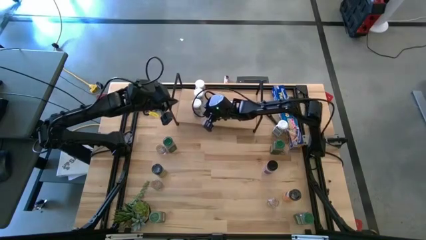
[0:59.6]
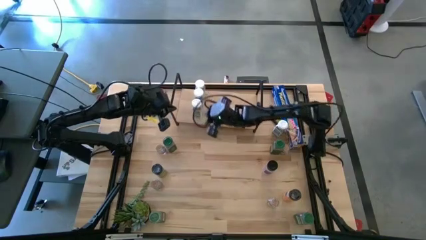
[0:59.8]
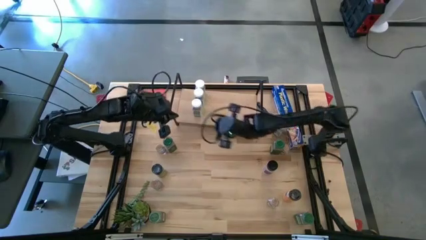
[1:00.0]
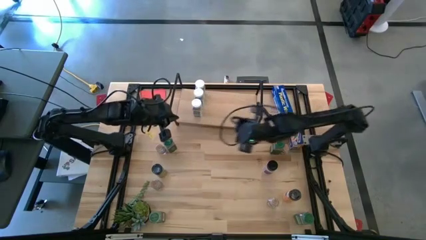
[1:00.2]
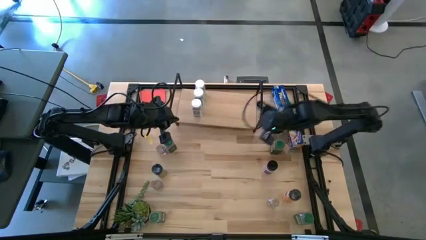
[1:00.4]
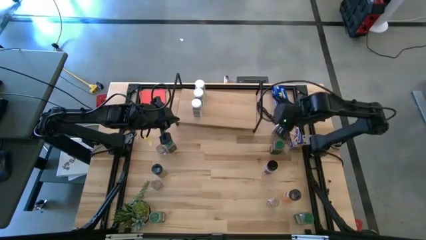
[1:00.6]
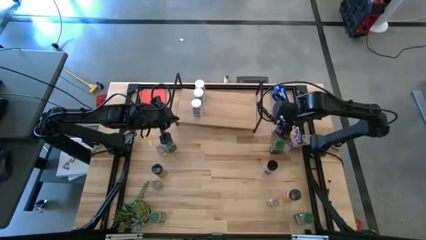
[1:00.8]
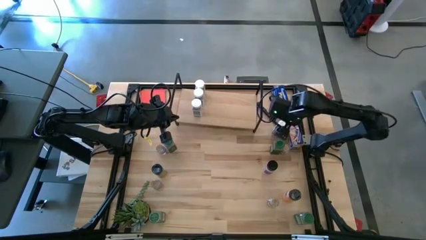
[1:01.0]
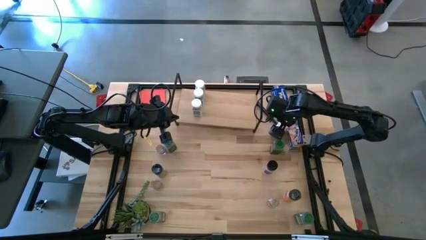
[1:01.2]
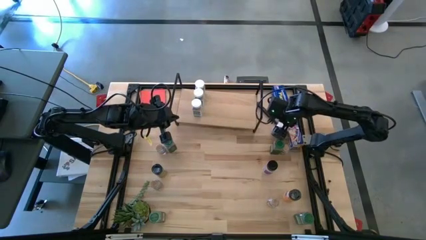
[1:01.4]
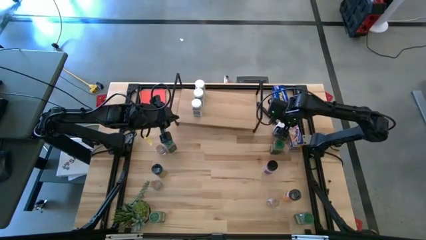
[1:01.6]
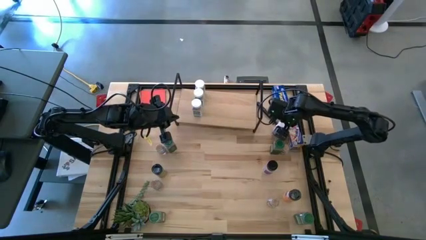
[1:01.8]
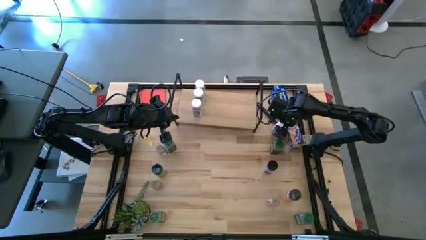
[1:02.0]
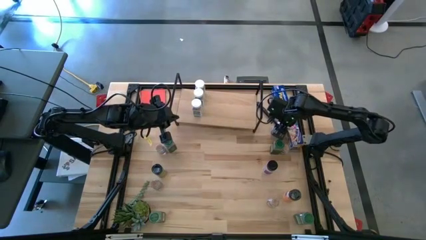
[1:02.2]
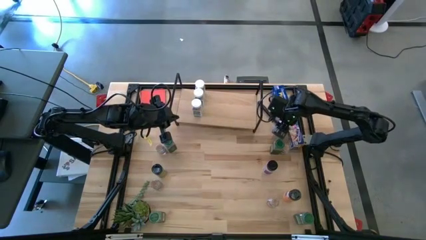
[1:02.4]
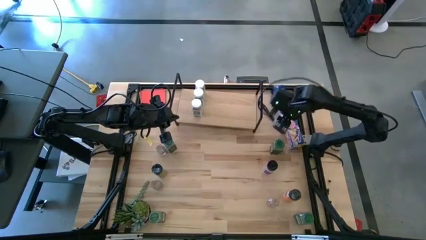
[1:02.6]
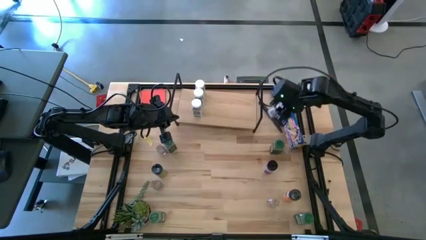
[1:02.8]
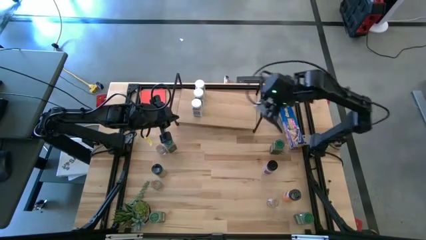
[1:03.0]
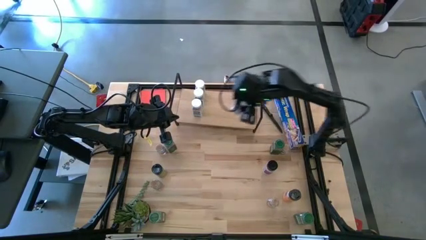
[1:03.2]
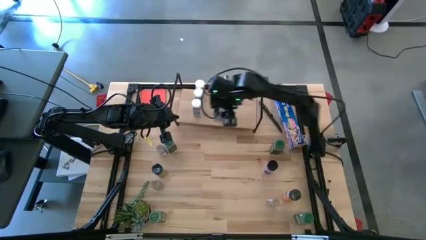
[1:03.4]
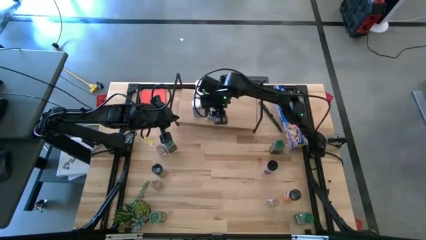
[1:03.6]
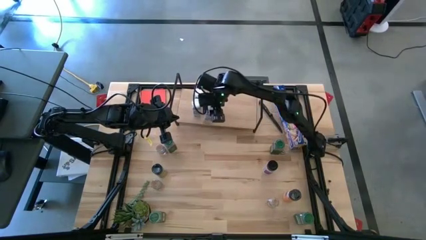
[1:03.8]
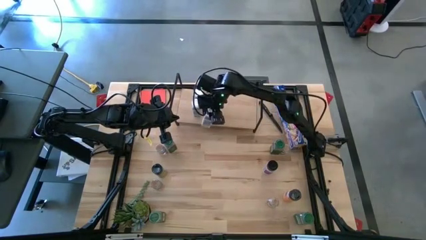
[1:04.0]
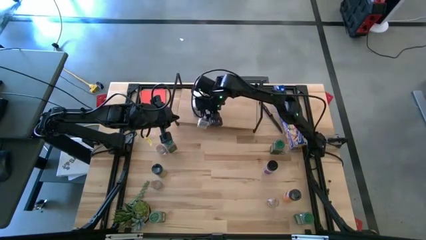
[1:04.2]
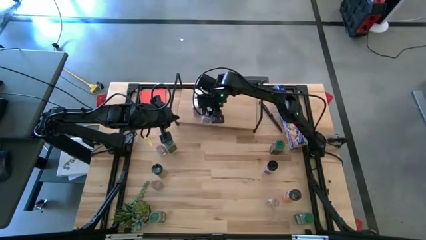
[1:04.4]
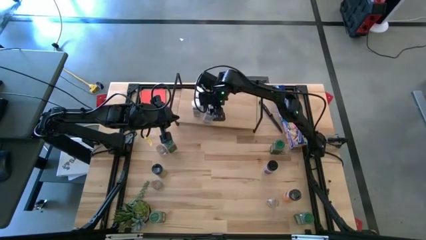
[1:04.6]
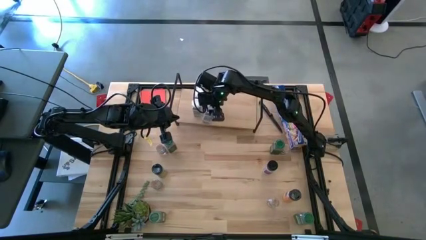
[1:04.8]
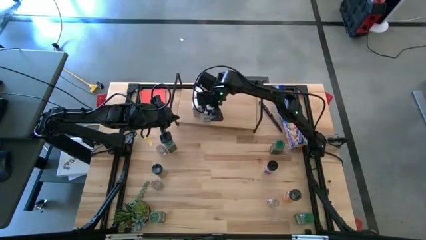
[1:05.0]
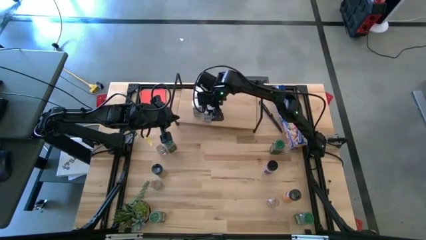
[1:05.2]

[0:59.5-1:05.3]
Task: Shelf spices
Put the white seasoning bottle on the shelf

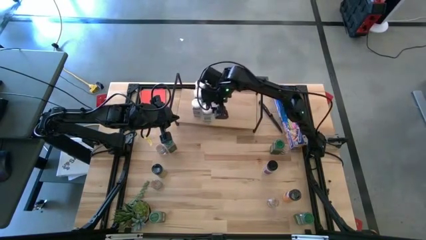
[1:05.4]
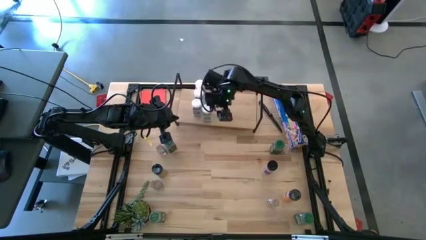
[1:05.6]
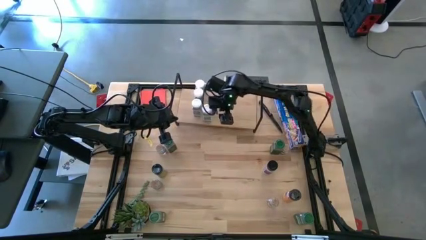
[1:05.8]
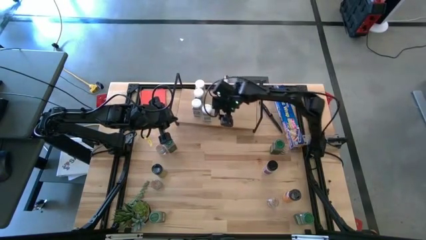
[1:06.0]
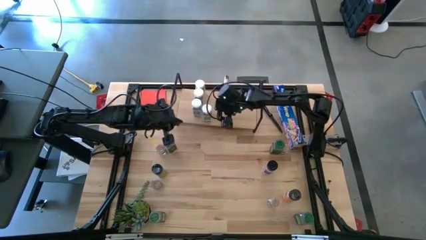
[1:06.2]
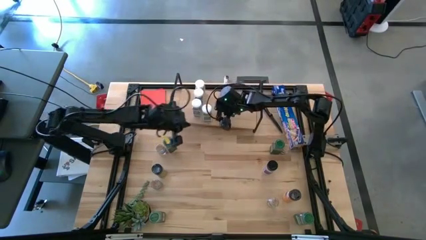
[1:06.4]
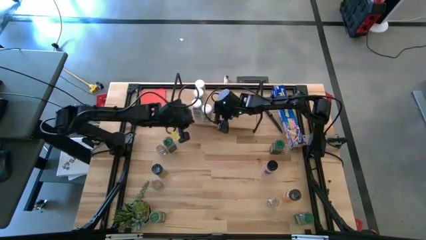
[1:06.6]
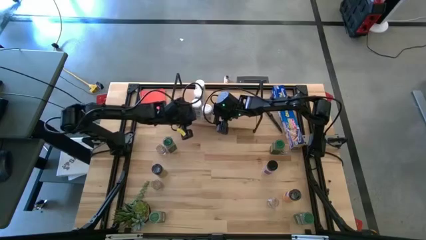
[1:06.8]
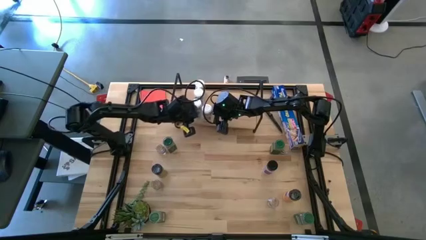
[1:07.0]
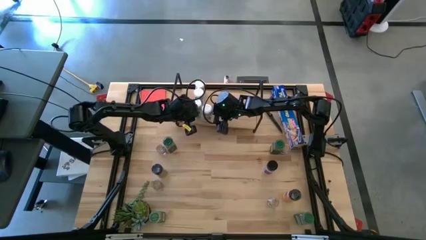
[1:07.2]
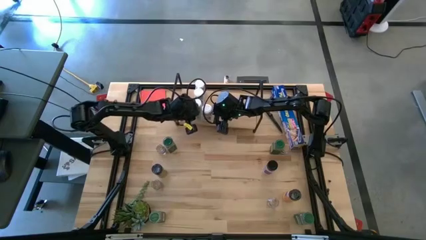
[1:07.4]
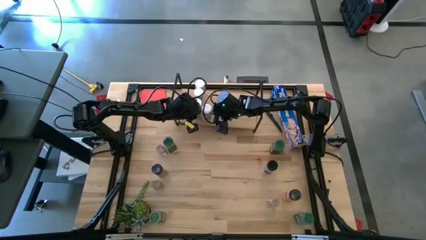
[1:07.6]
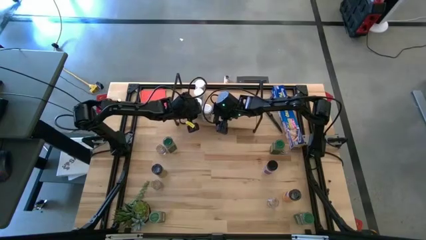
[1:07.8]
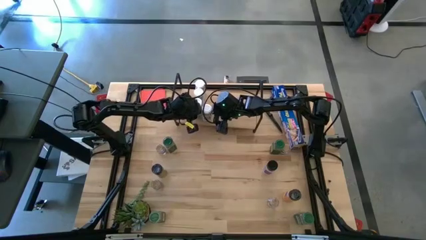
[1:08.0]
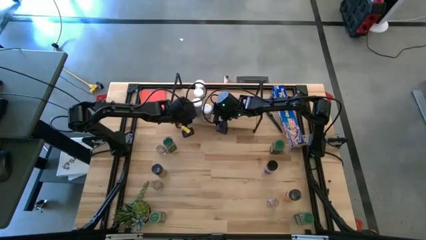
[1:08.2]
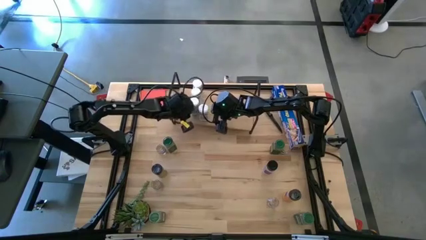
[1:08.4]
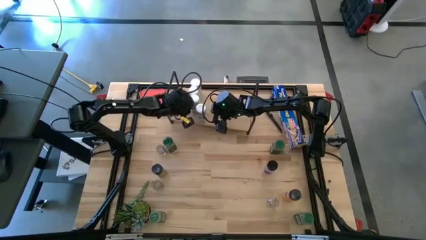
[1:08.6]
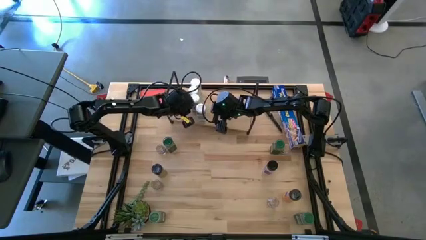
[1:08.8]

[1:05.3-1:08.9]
Adjust the middle white seasoning bottle on the shelf

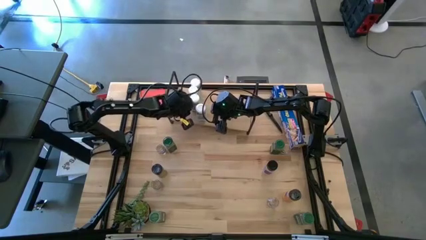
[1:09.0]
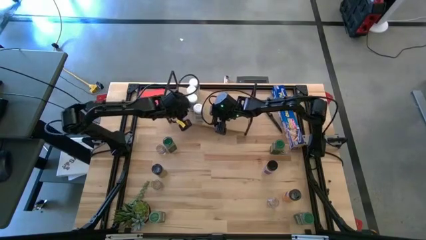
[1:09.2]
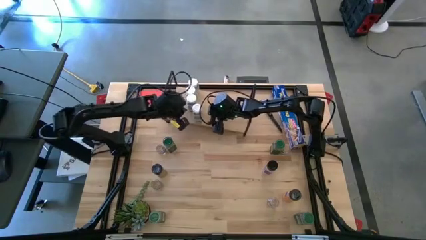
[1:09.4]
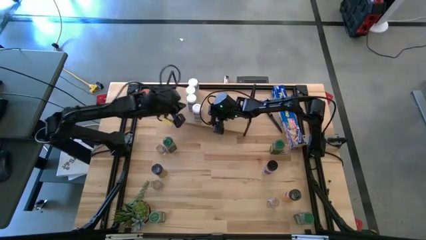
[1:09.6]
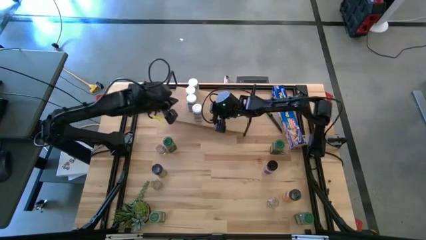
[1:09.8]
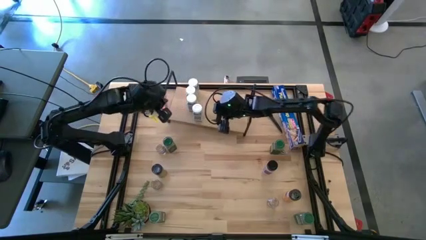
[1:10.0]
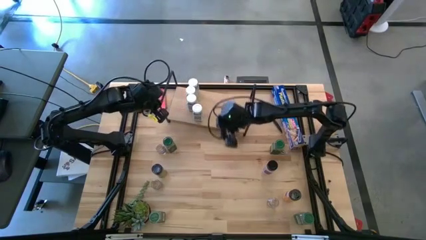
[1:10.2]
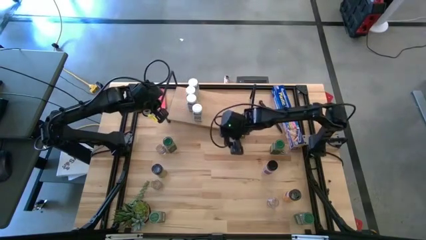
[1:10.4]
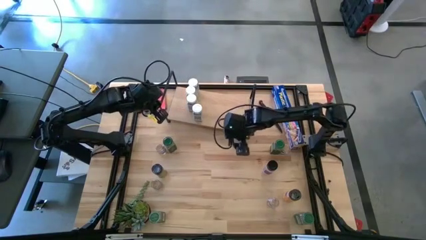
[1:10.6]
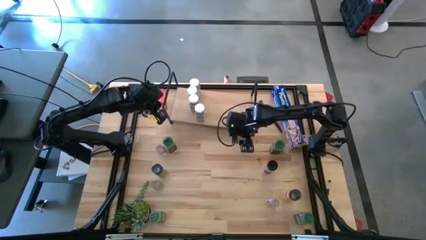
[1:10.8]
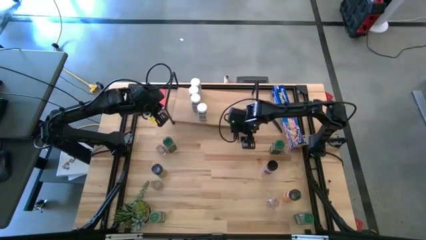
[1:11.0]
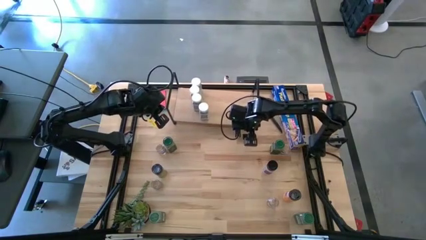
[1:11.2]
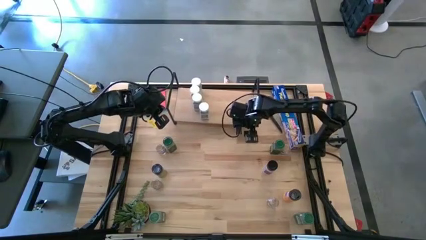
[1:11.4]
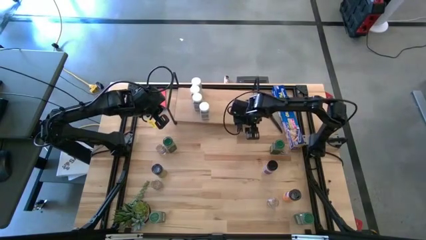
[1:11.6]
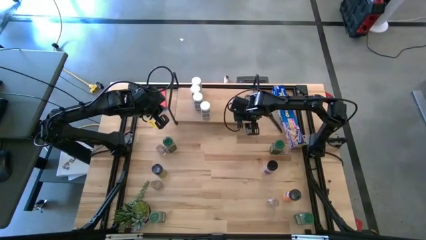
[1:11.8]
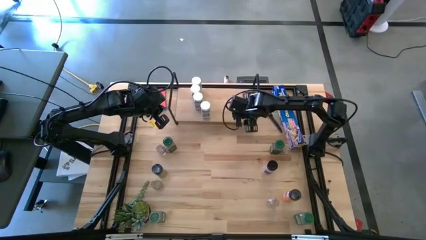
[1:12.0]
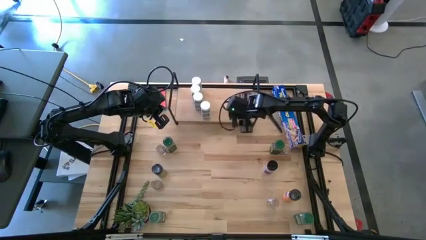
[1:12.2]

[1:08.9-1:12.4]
Adjust the shelf

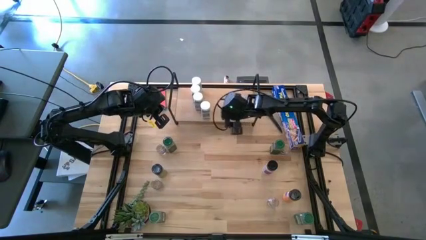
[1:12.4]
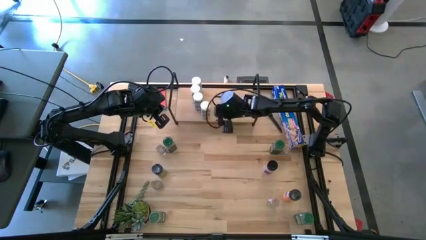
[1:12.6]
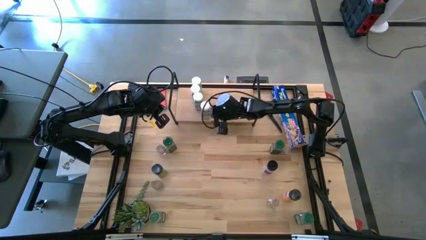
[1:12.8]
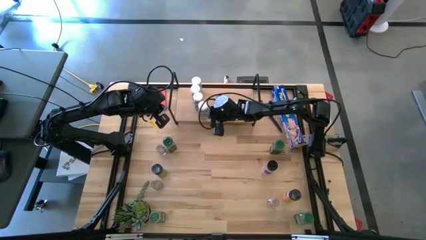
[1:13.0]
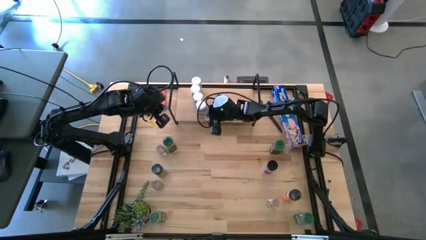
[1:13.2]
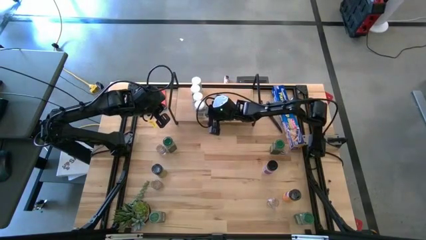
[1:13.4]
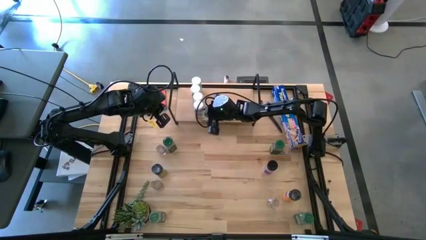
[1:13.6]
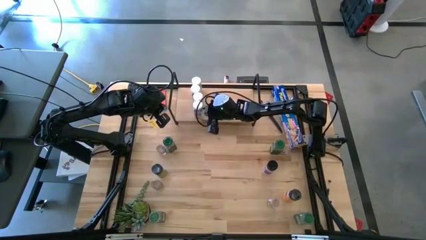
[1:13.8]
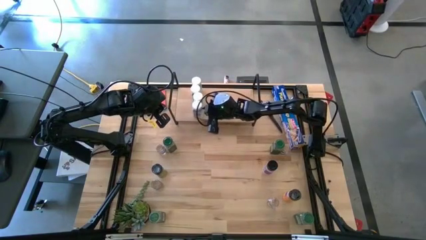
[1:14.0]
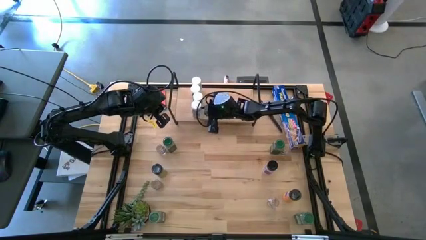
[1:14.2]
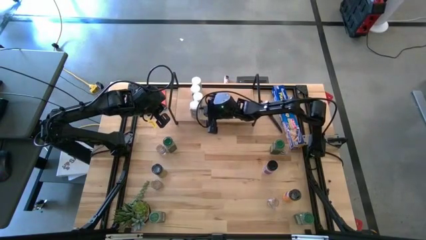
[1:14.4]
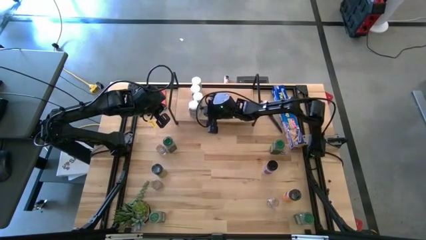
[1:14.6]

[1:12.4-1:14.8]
Adjust the front white seasoning bottle on the shelf
